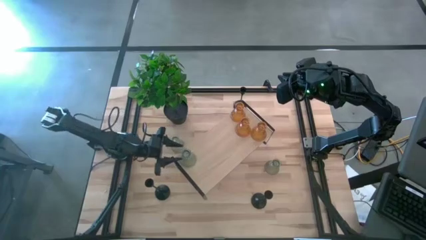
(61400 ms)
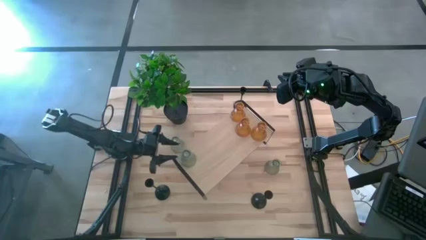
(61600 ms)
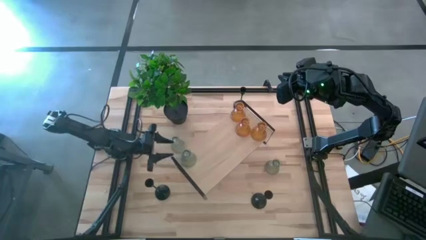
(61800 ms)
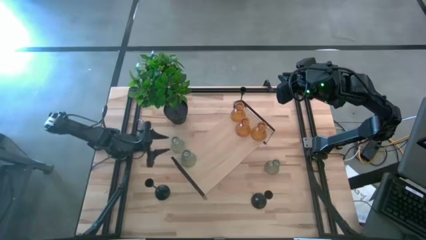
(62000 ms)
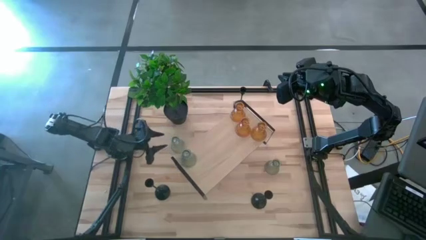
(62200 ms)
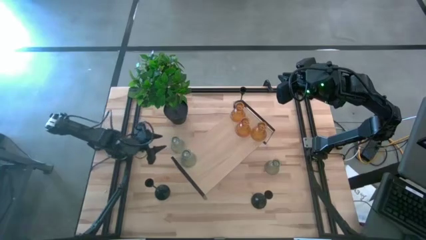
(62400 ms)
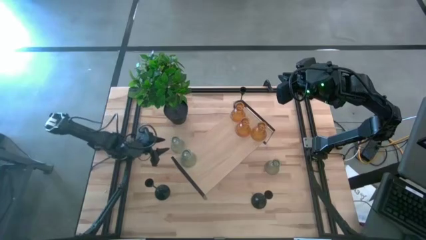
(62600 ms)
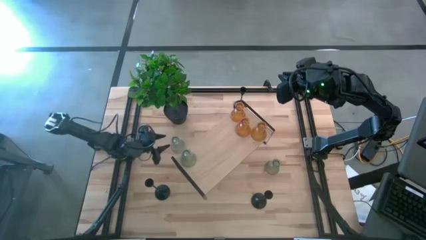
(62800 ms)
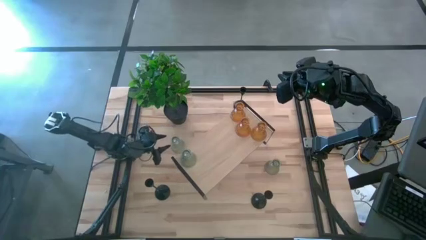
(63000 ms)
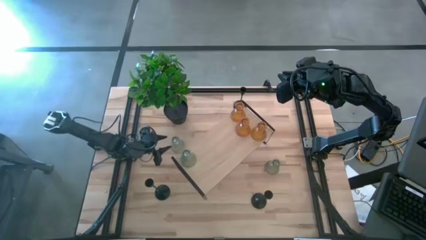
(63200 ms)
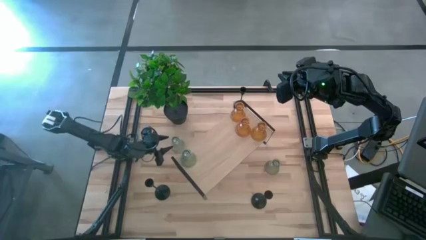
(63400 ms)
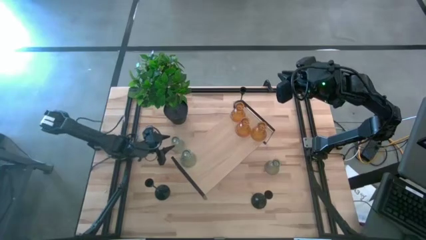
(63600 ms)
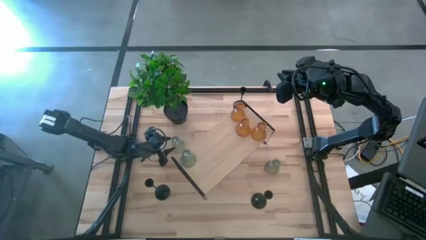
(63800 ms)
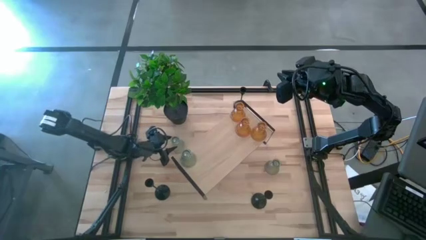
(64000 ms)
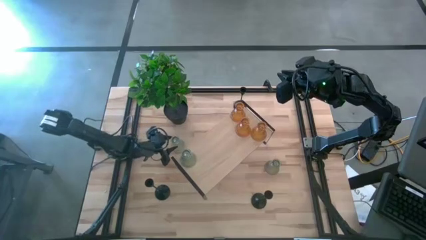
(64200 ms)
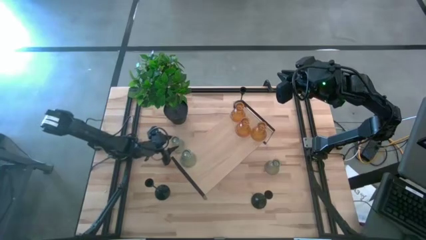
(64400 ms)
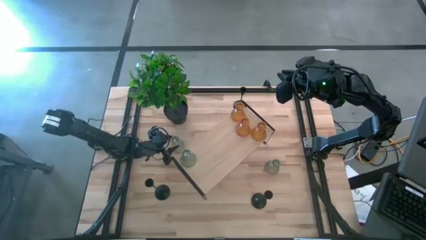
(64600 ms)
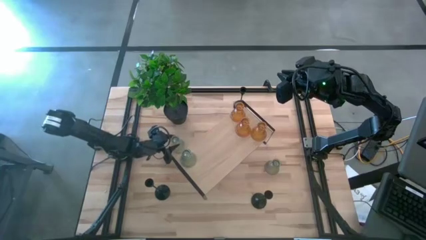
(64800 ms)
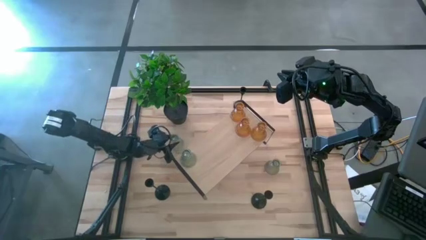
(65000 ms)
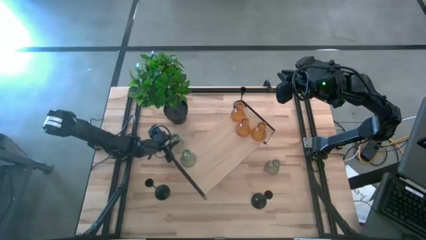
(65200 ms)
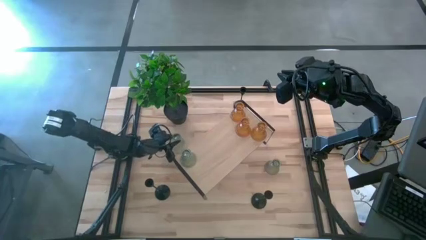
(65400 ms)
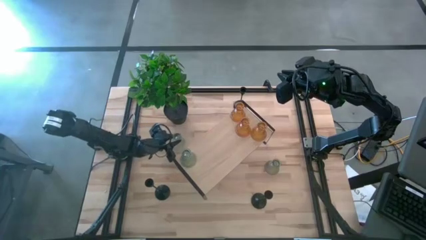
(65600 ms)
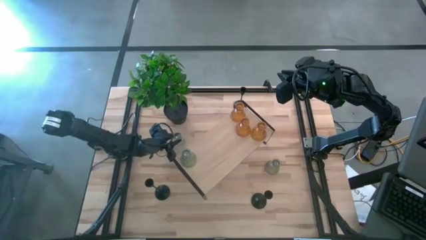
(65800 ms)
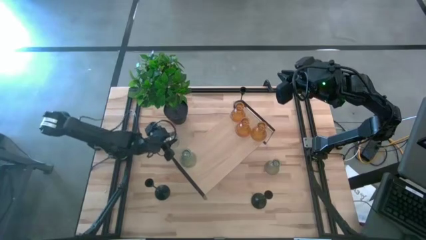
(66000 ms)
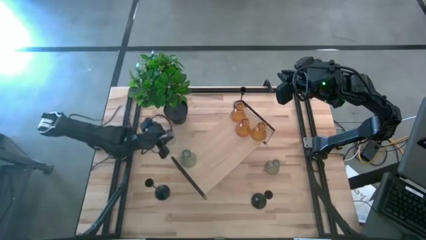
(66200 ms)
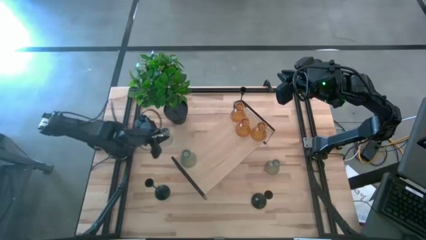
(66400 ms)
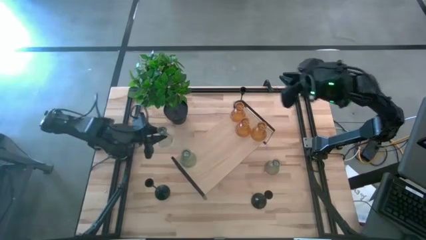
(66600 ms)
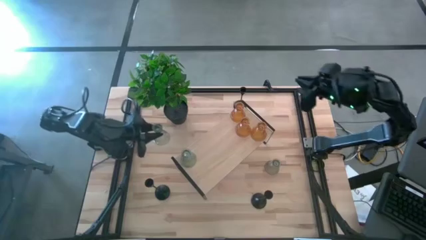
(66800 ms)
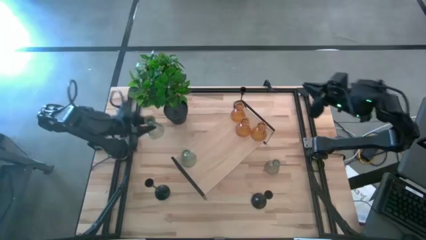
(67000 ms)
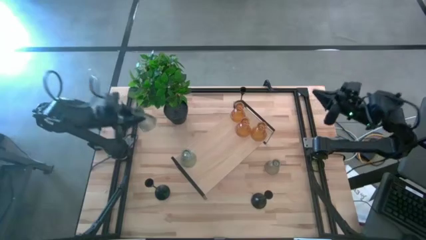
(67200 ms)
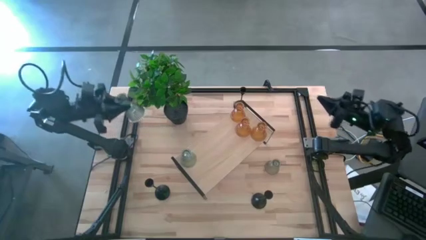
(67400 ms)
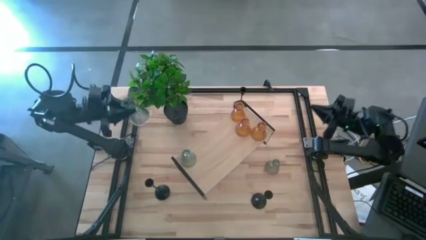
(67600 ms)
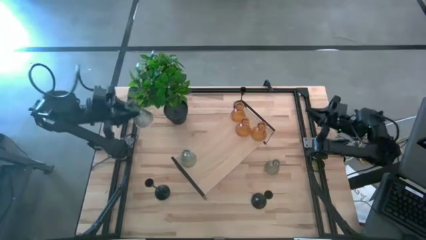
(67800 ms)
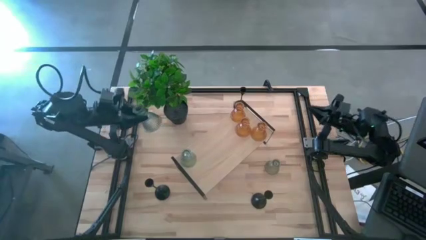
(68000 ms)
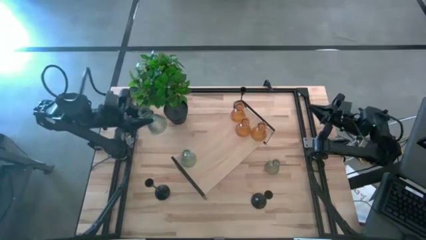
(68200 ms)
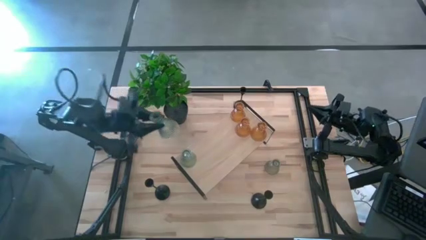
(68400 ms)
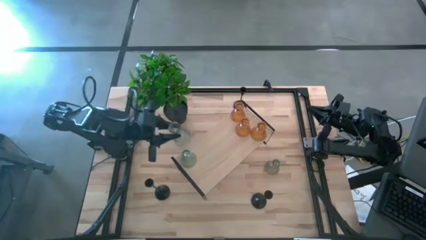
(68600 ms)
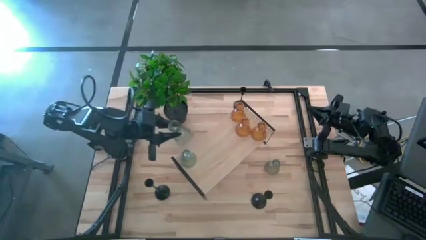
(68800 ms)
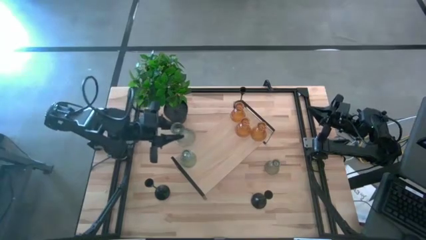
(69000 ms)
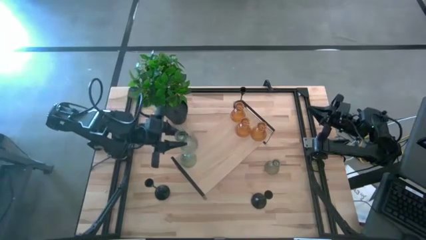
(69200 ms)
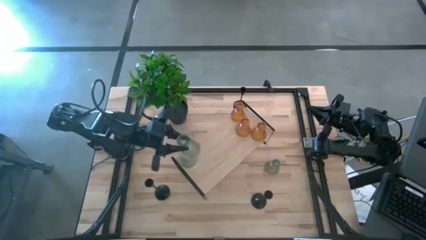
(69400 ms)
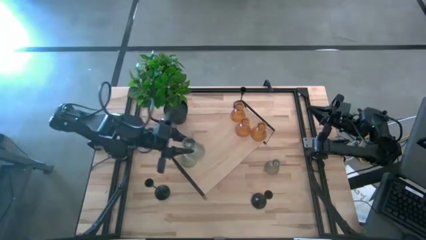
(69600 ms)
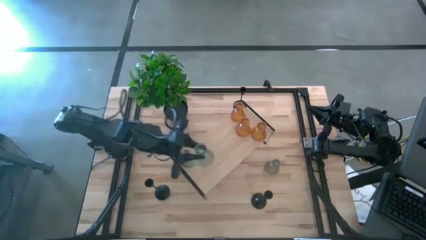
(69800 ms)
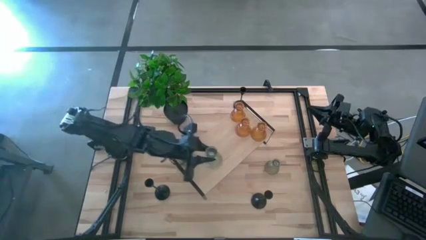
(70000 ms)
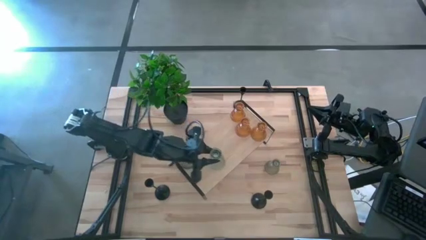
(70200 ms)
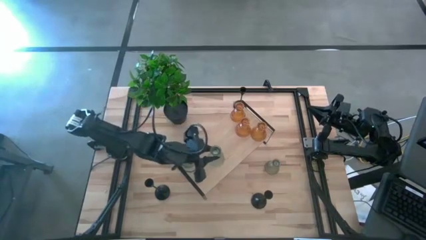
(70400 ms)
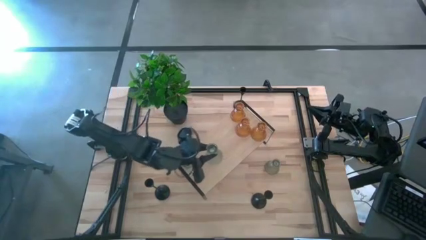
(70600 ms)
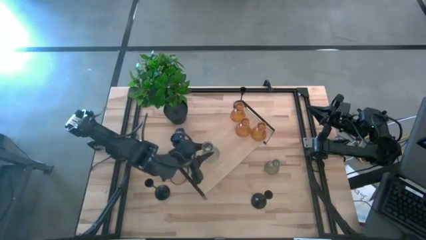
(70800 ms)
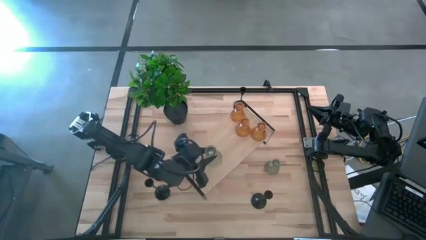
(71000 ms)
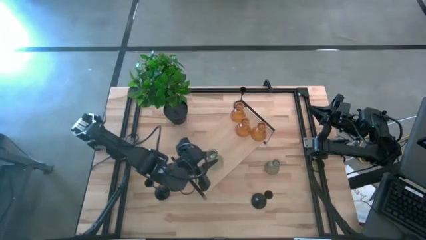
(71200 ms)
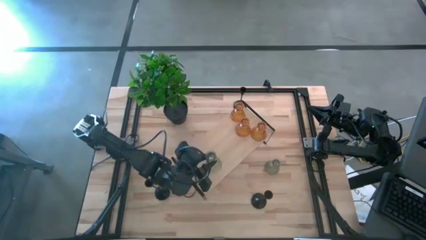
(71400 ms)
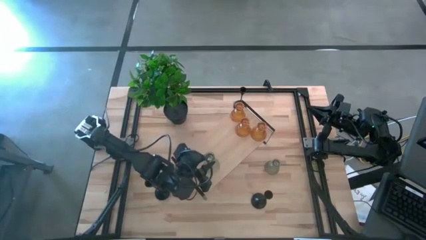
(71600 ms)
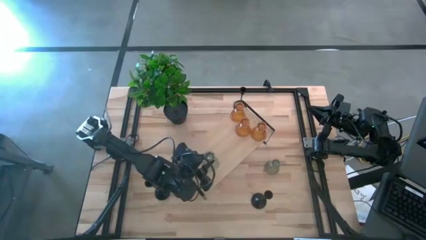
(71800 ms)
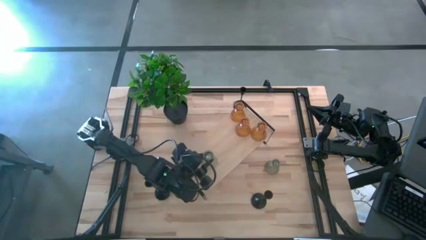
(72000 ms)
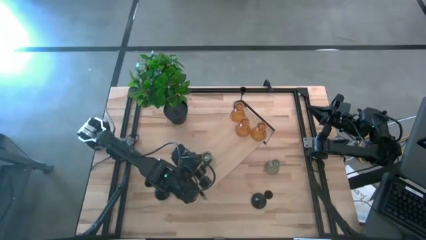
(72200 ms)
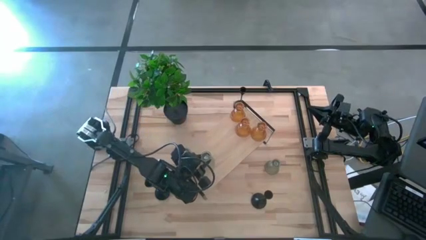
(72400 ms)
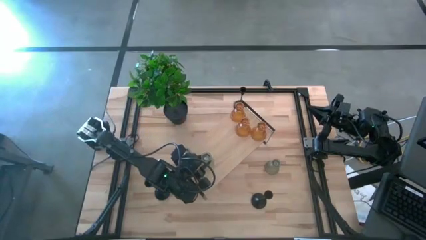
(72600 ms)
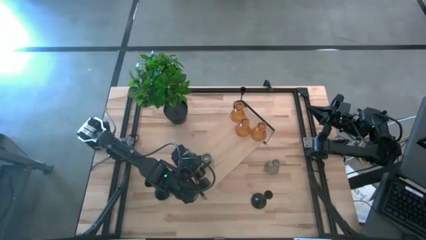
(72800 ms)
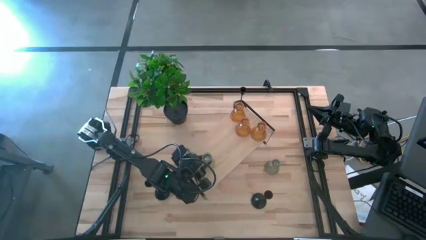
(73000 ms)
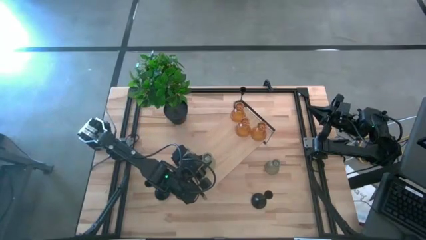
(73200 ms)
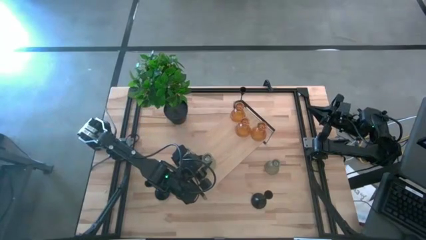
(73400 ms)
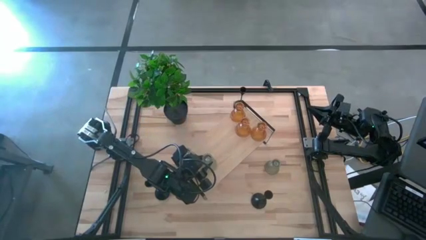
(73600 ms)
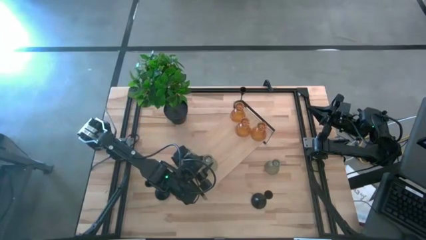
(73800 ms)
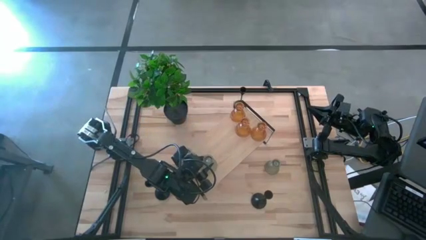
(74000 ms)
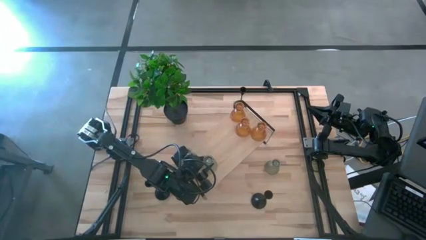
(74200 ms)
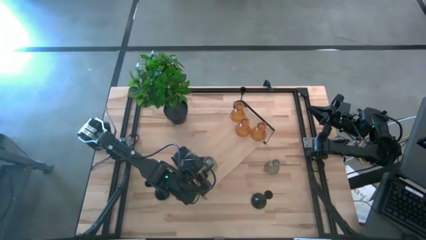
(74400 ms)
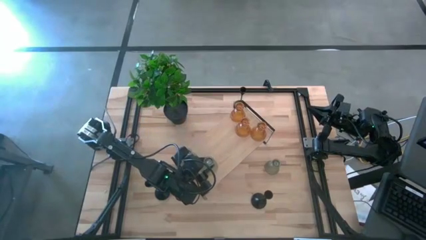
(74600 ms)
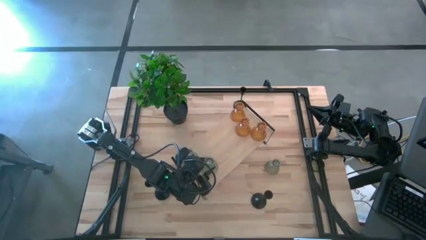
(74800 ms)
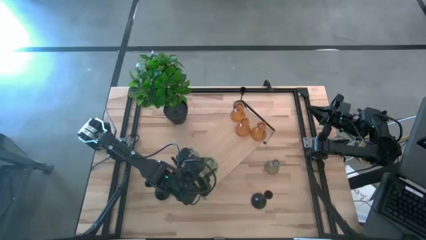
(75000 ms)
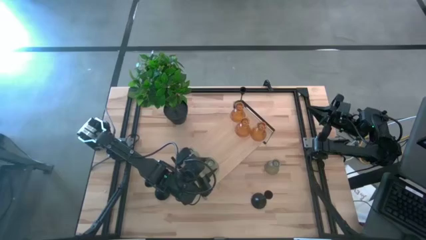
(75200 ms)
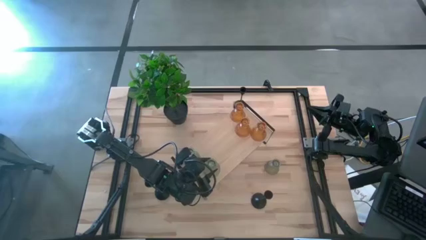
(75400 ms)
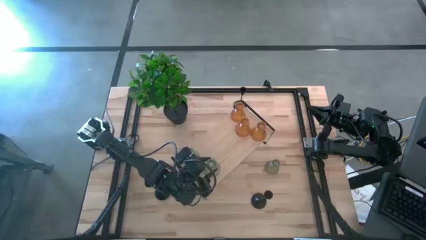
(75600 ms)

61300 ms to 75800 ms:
Task: Pick & Place candle stick holders
Put the left transparent glass candle holder on the shelf
